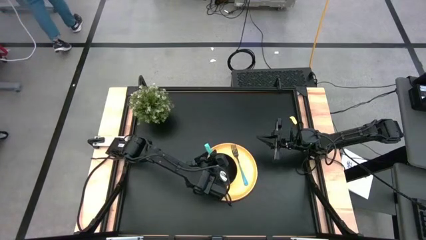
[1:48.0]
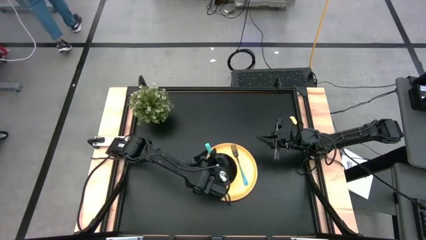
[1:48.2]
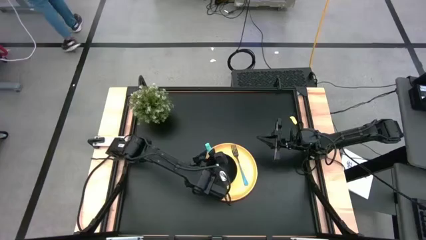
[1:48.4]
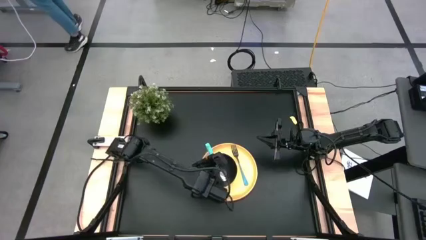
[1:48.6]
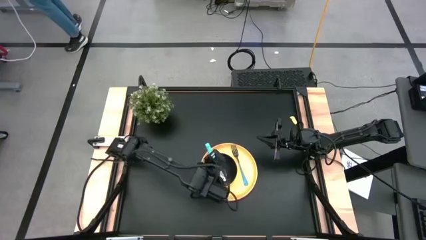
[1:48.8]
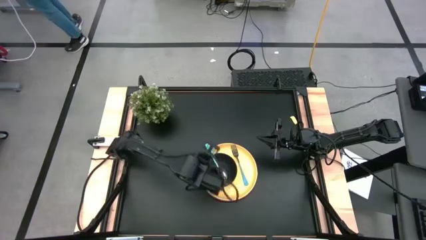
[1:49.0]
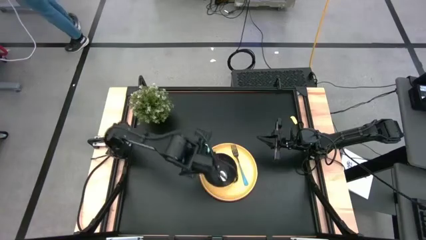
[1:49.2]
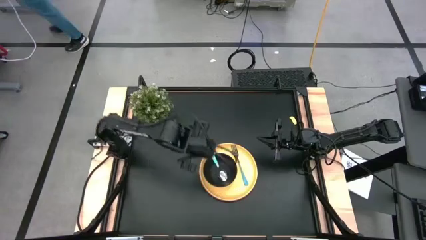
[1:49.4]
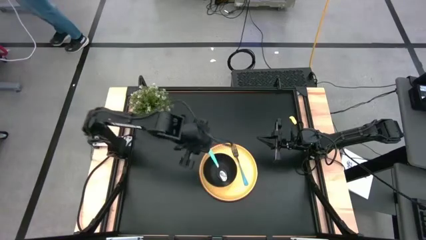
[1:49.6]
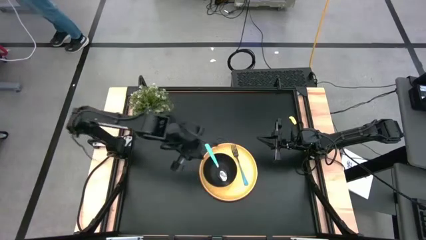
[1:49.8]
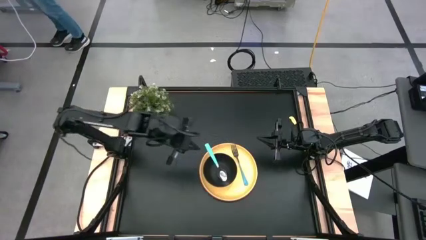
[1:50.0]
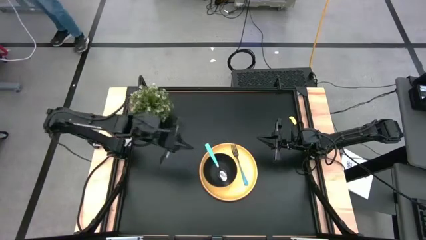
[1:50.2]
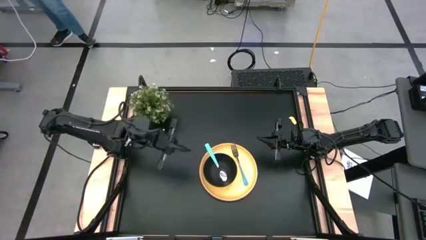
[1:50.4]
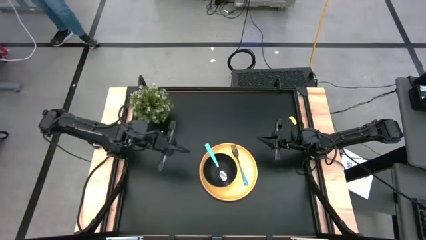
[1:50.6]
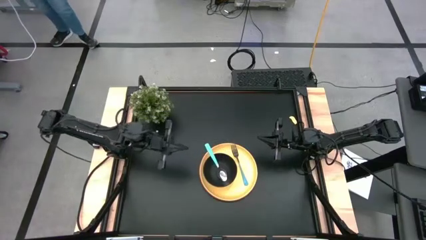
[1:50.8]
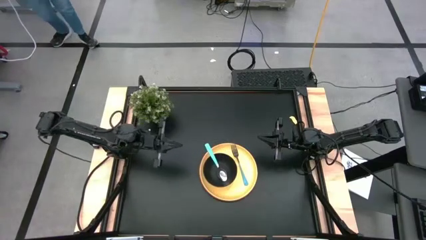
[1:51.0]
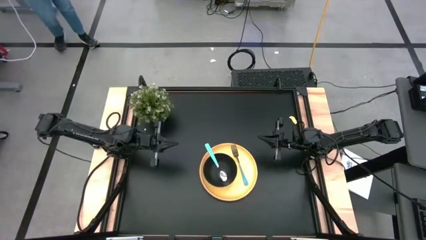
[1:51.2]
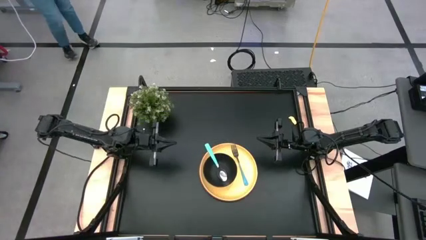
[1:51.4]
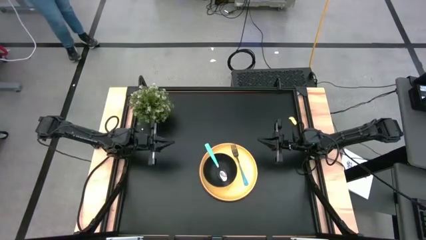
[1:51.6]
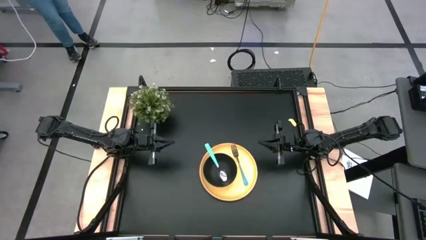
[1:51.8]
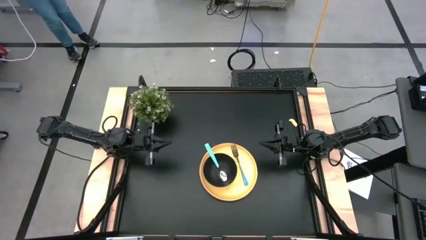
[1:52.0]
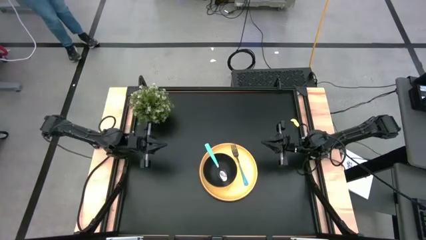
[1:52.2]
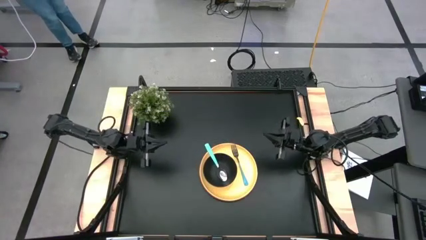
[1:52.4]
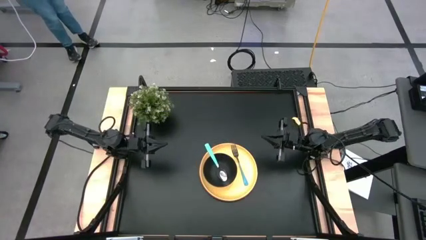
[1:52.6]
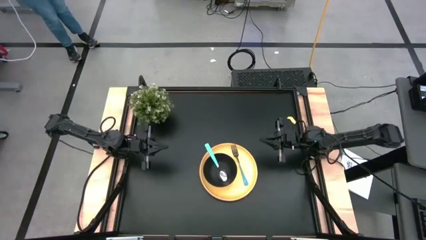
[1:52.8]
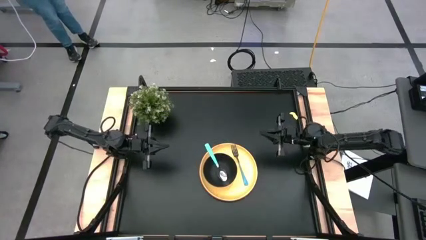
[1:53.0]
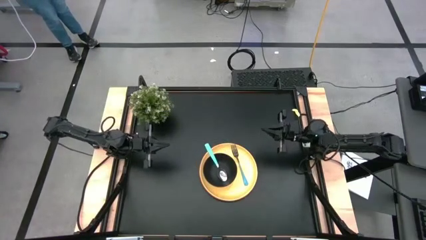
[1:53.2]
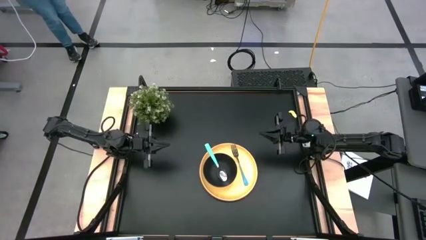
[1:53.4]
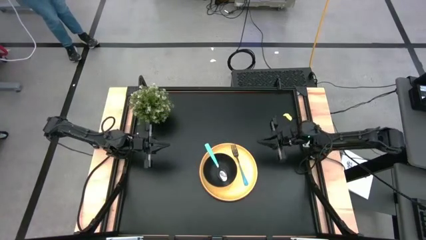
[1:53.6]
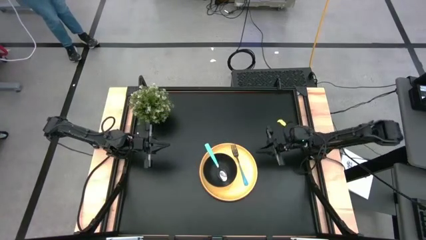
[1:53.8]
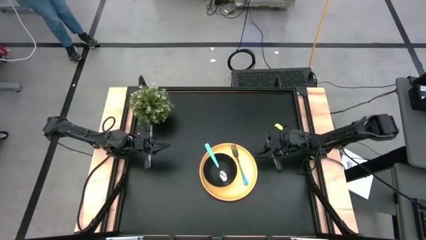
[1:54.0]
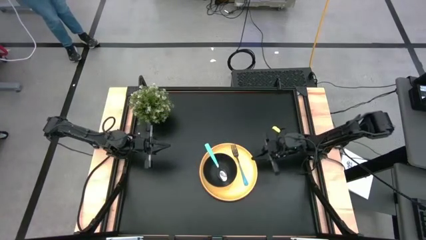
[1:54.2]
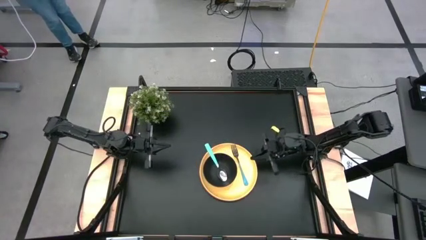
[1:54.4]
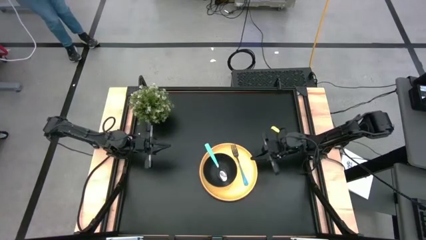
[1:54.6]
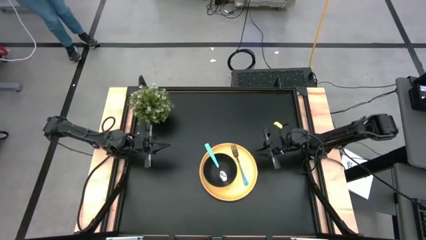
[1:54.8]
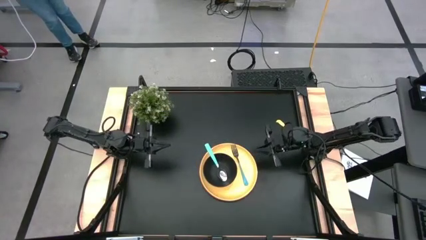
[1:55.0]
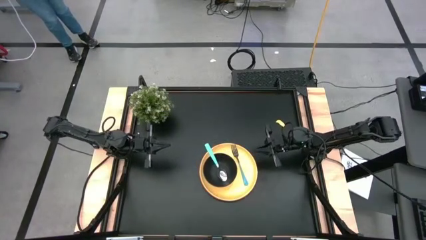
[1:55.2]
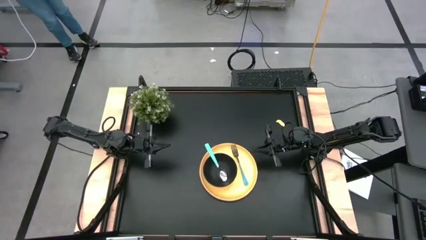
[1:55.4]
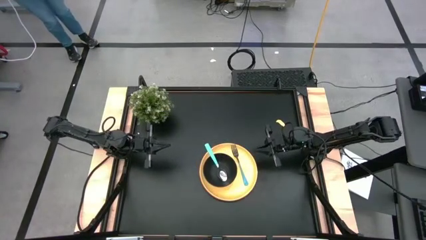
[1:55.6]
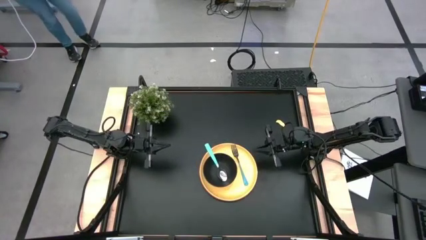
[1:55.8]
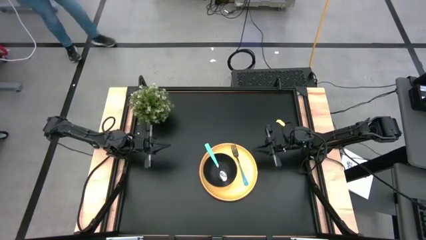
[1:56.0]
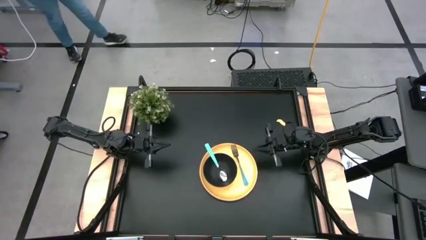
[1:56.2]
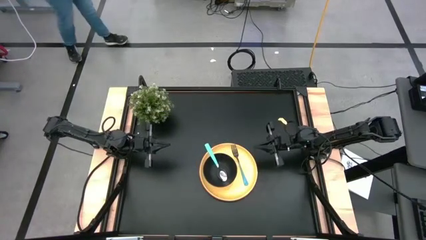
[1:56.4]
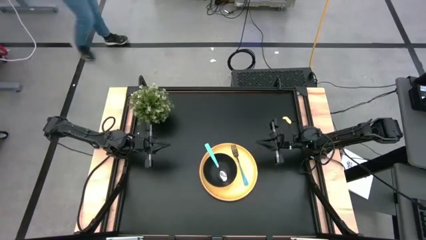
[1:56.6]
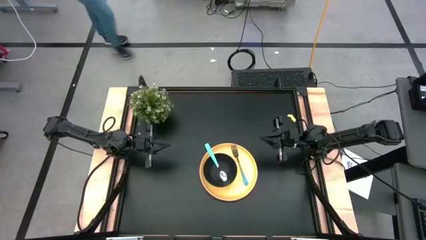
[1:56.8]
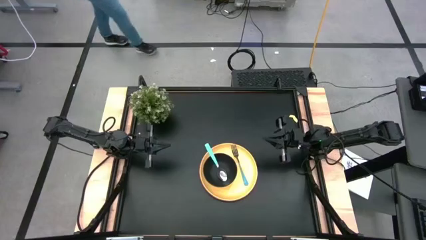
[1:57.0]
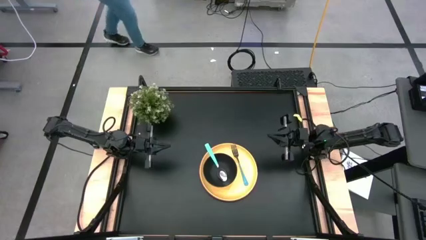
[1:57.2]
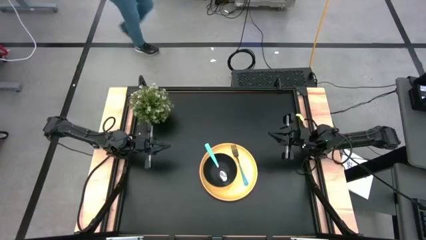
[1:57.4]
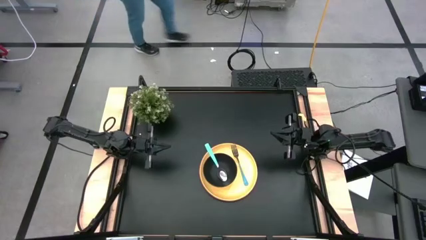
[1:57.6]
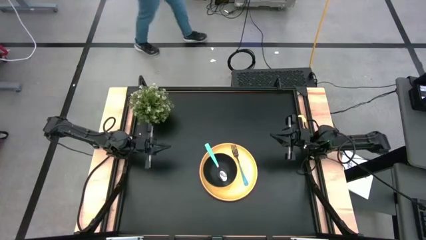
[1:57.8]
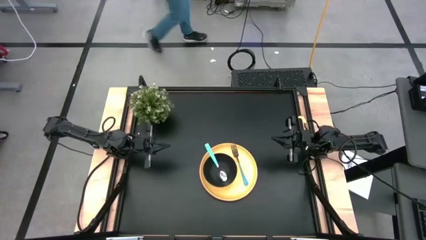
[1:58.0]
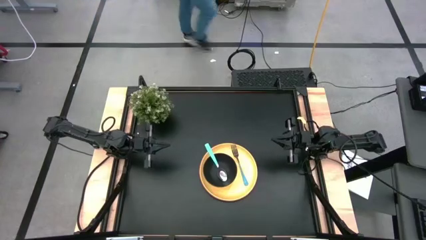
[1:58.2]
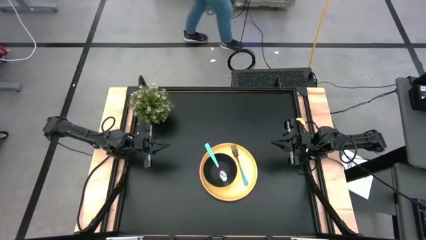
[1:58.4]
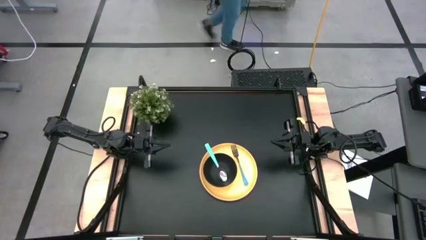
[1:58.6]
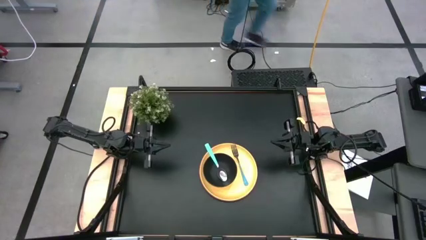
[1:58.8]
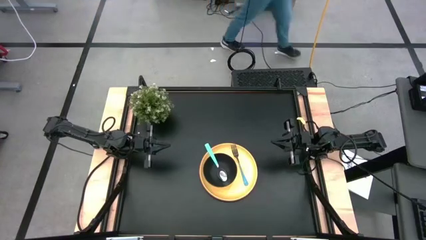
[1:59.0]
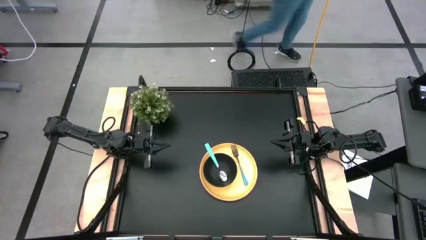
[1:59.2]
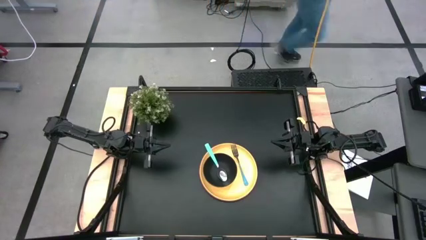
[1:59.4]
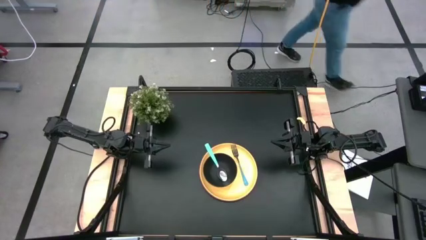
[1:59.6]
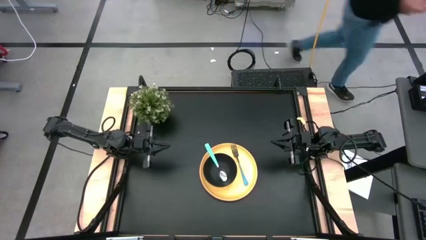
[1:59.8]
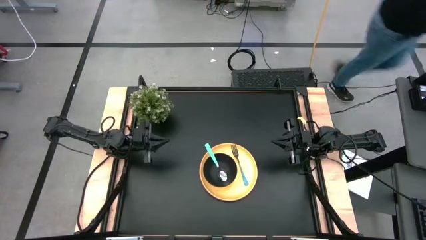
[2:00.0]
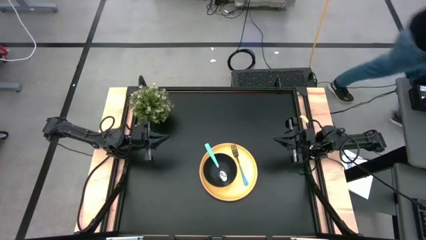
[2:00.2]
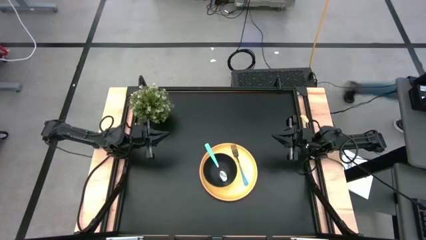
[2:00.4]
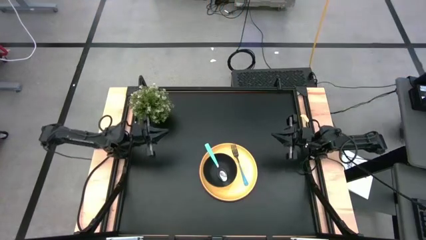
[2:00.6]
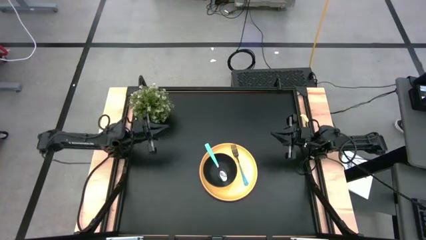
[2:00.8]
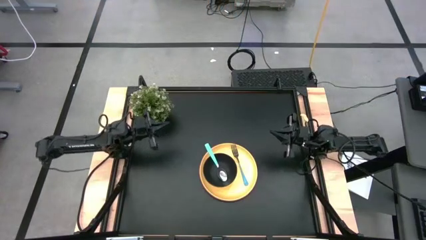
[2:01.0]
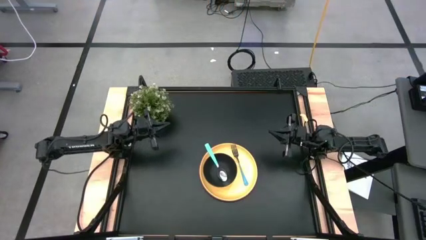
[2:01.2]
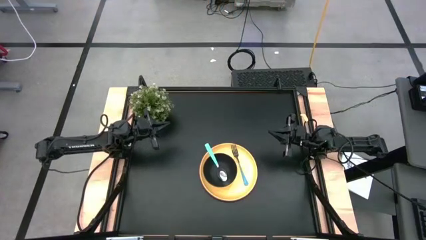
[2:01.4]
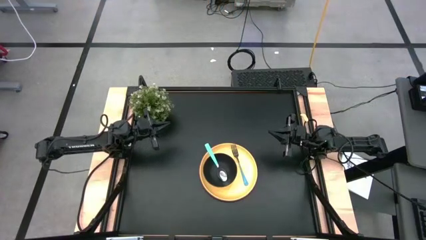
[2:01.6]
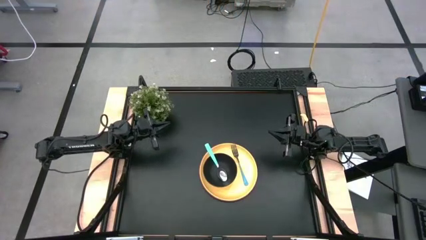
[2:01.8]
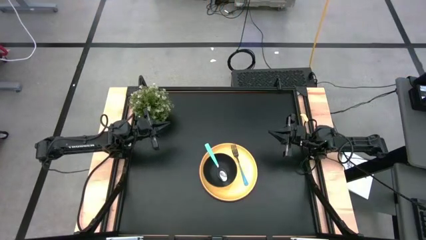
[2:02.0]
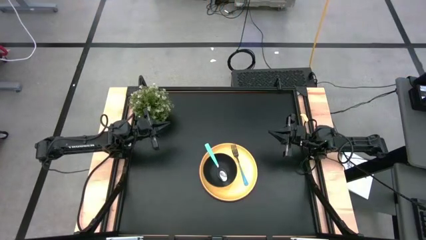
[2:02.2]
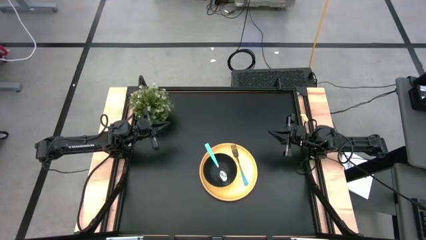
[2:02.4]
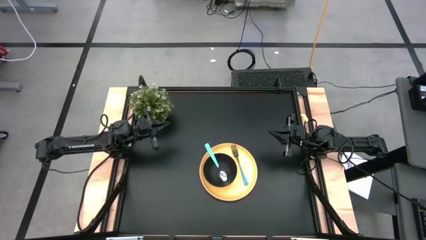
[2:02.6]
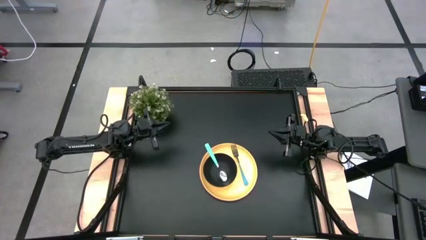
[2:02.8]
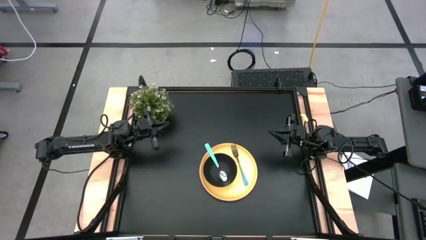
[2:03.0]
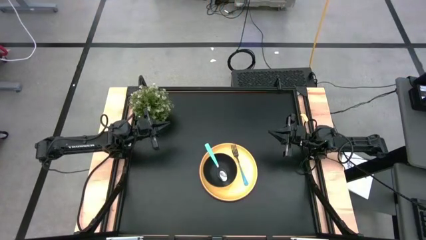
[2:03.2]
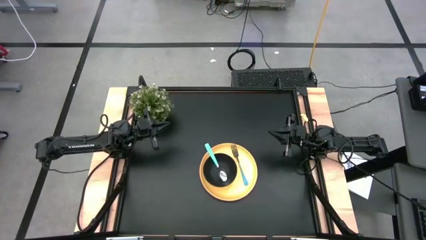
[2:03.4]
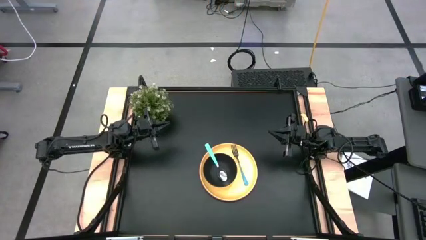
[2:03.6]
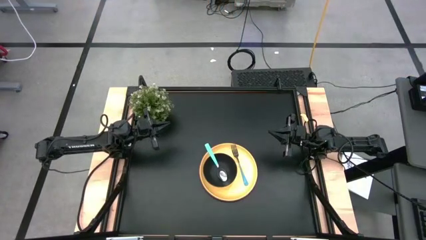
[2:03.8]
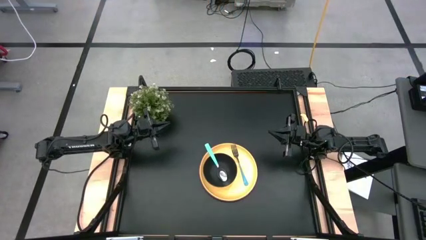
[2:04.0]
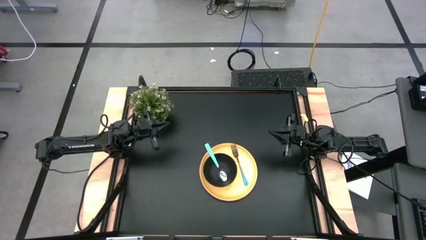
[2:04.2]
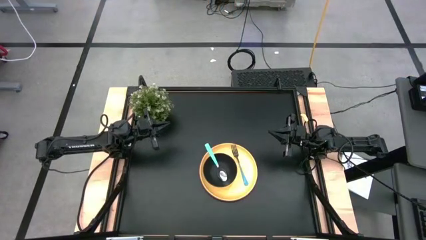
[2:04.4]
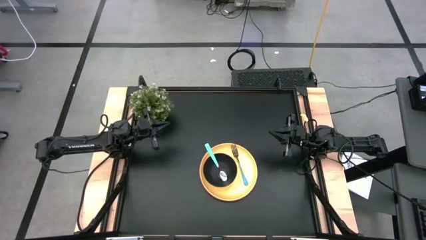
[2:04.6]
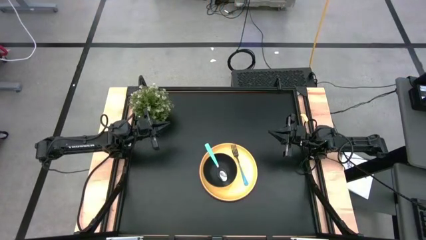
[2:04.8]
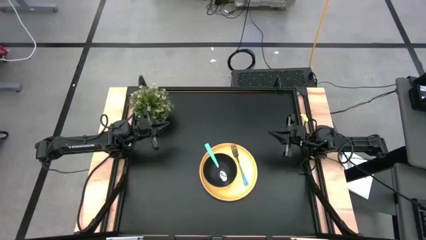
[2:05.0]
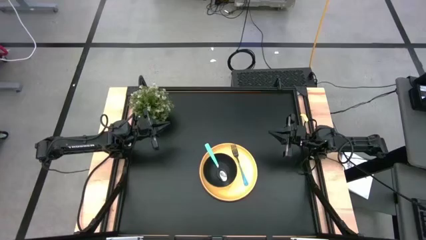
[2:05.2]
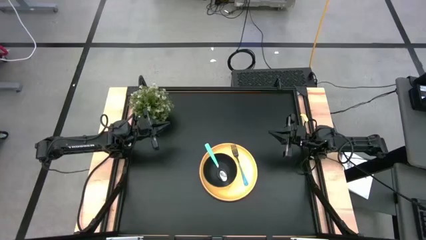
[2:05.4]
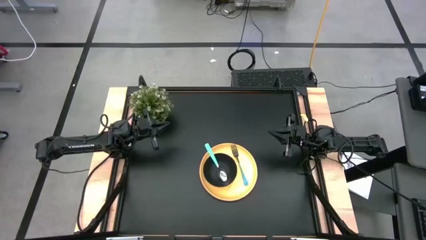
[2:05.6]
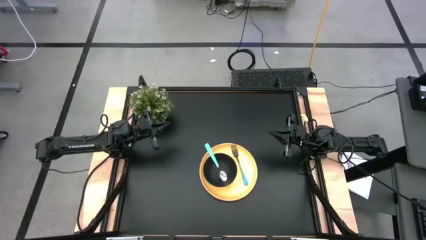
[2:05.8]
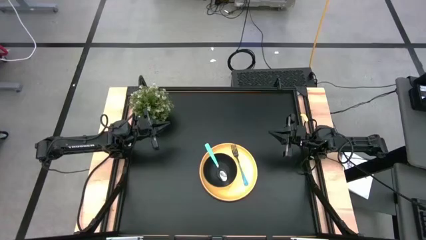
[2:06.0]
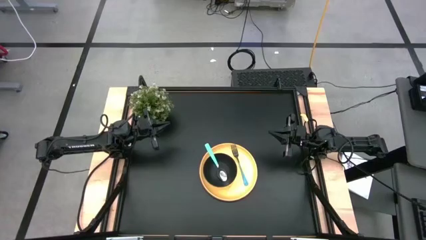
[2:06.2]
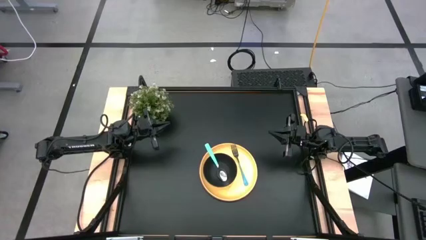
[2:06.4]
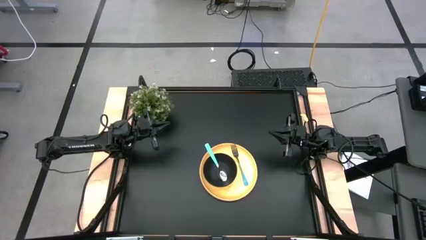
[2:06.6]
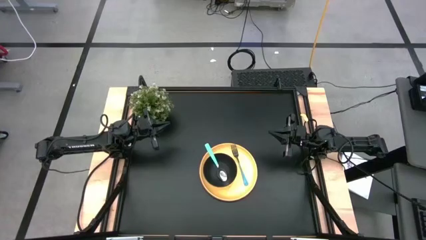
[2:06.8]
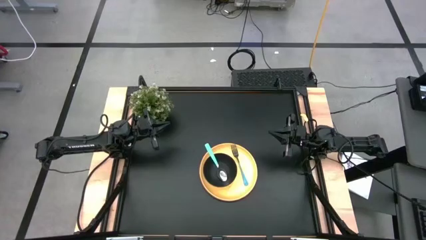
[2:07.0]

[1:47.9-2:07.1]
Task: Set table place
Return to Home Position
